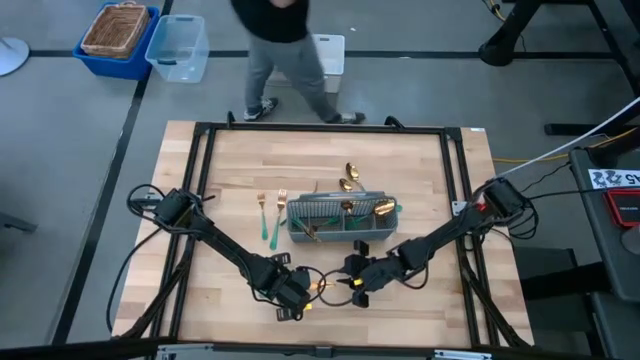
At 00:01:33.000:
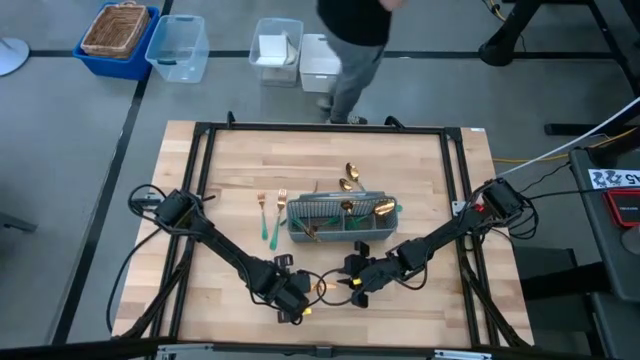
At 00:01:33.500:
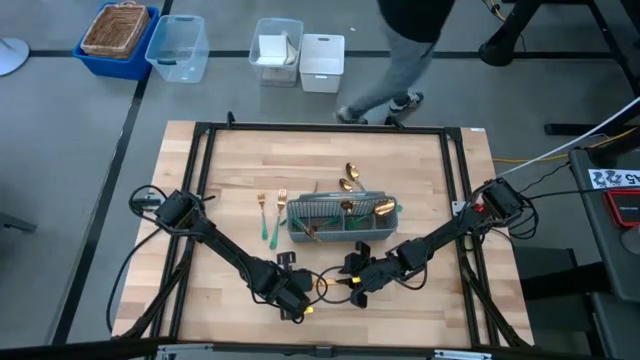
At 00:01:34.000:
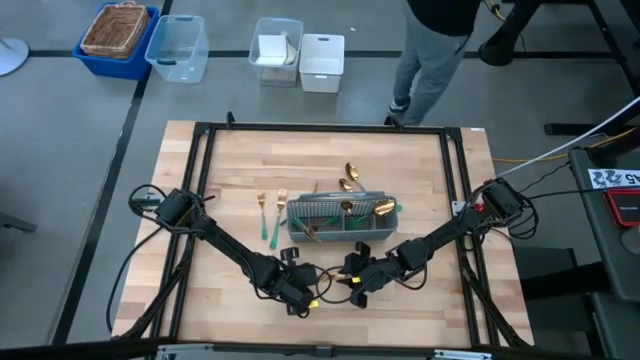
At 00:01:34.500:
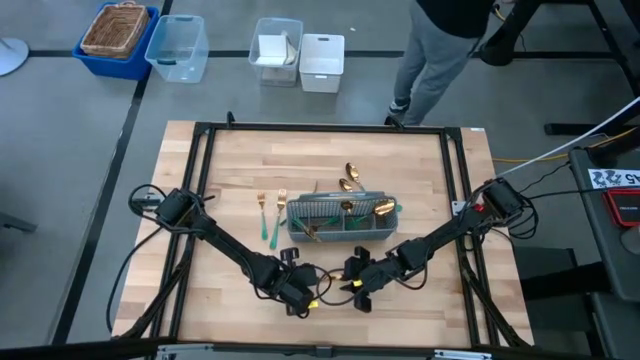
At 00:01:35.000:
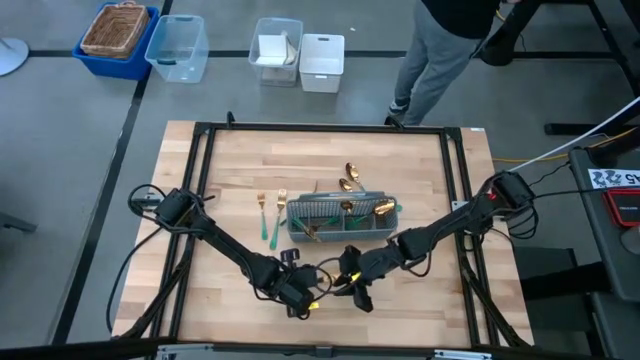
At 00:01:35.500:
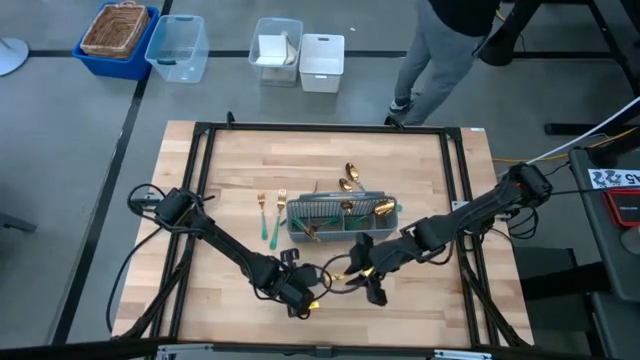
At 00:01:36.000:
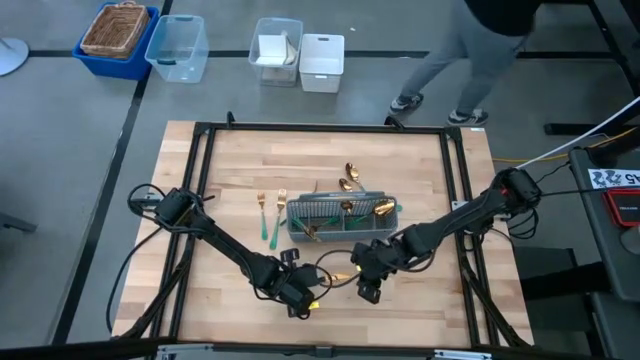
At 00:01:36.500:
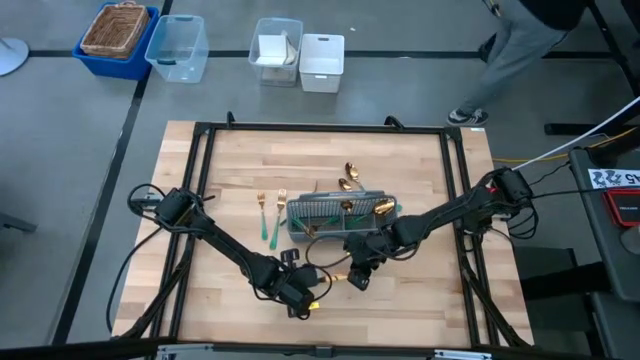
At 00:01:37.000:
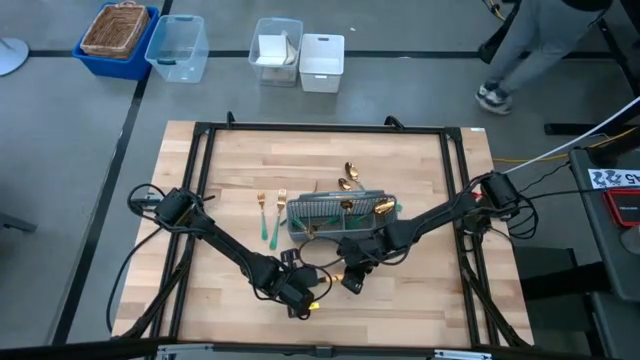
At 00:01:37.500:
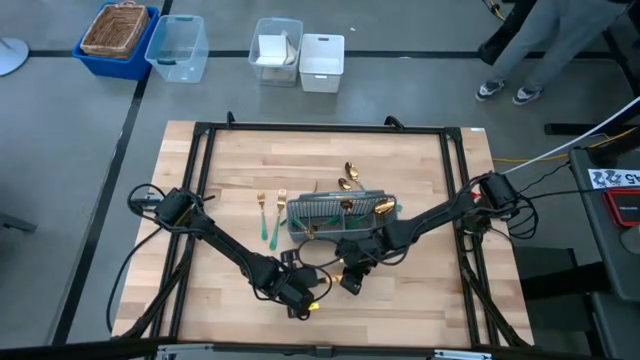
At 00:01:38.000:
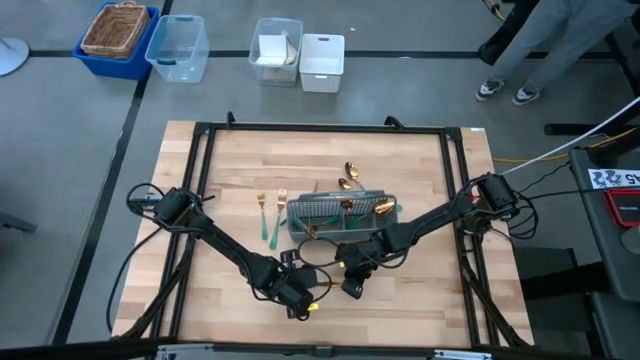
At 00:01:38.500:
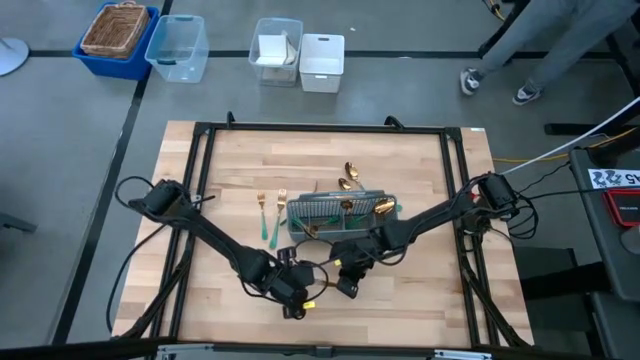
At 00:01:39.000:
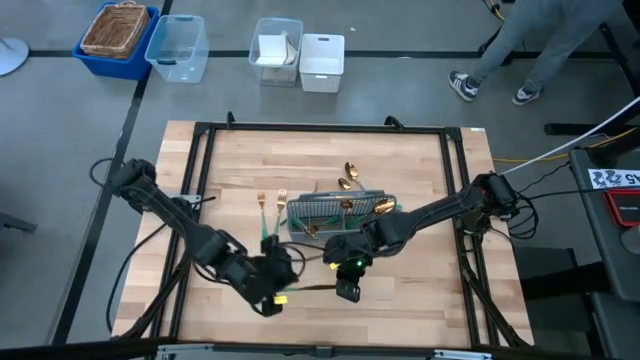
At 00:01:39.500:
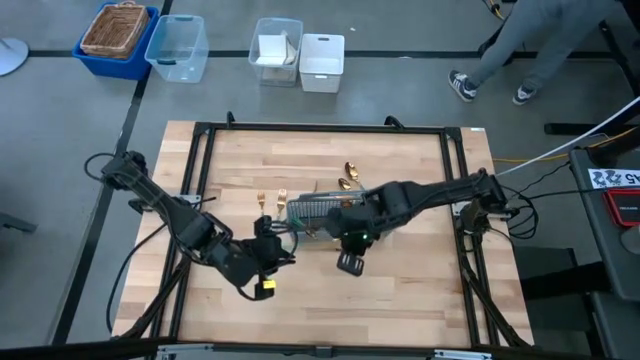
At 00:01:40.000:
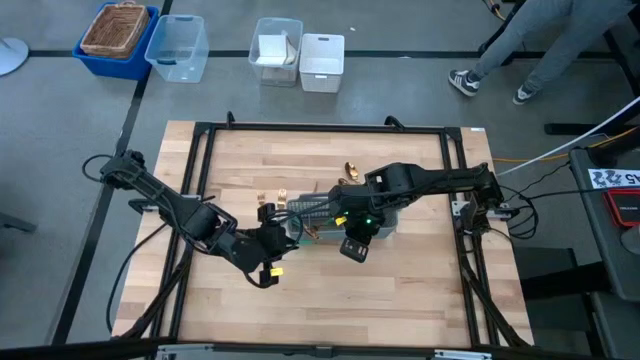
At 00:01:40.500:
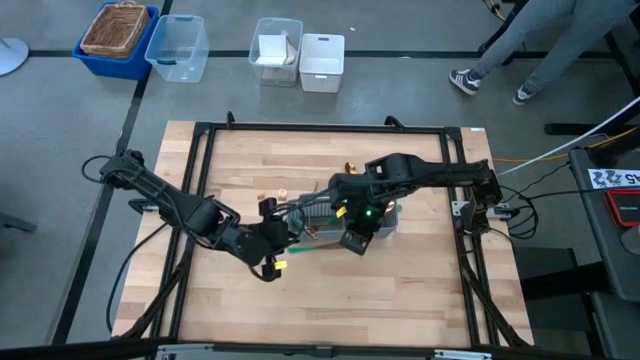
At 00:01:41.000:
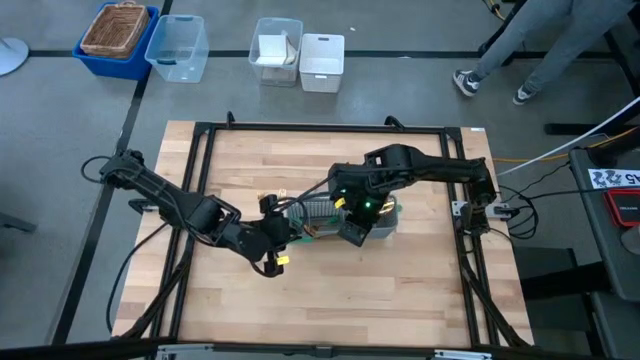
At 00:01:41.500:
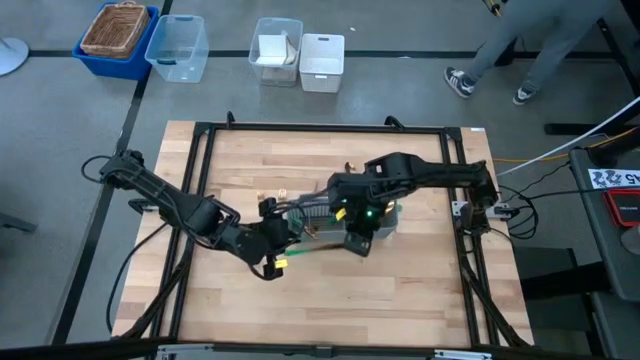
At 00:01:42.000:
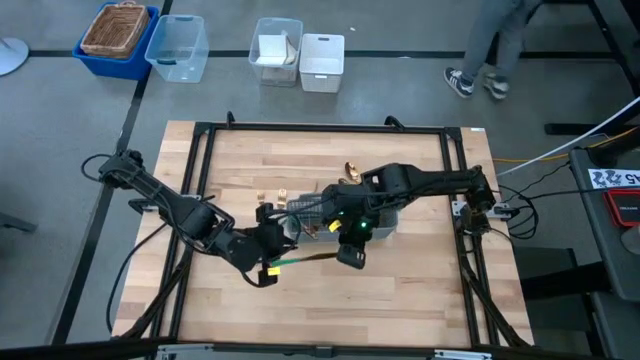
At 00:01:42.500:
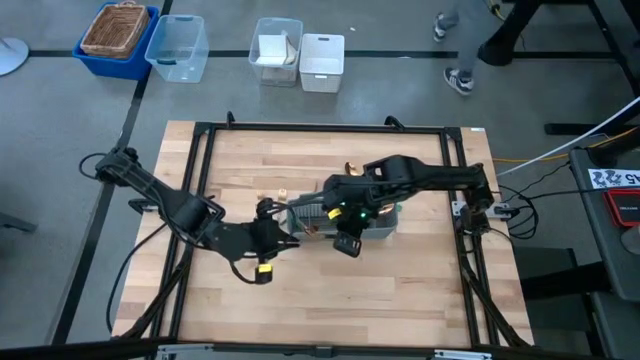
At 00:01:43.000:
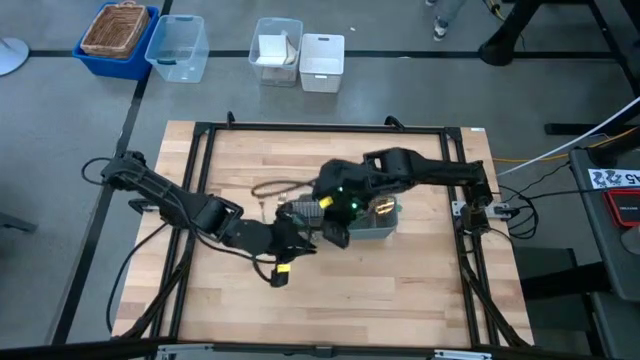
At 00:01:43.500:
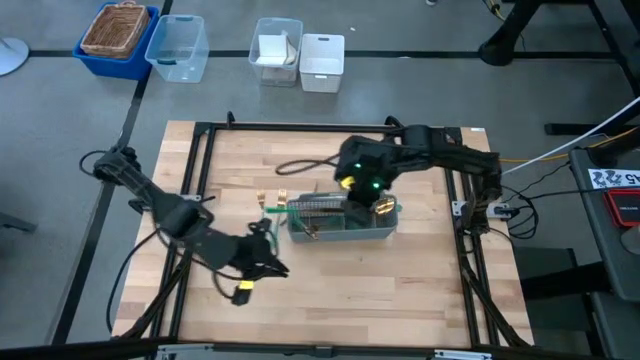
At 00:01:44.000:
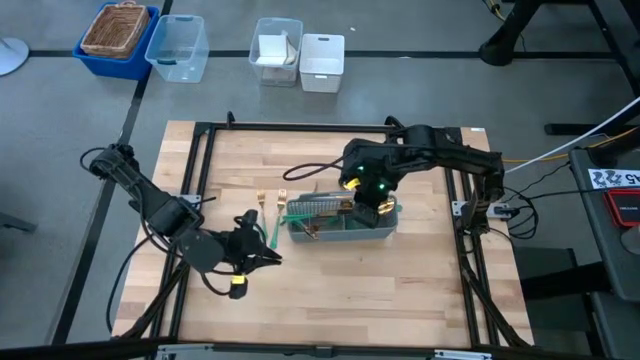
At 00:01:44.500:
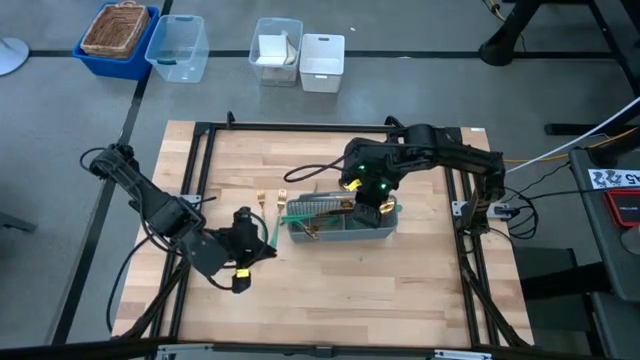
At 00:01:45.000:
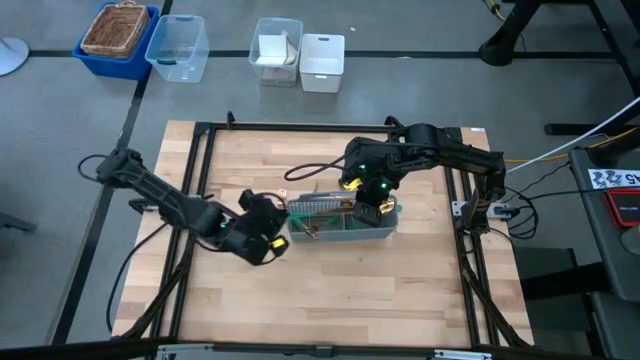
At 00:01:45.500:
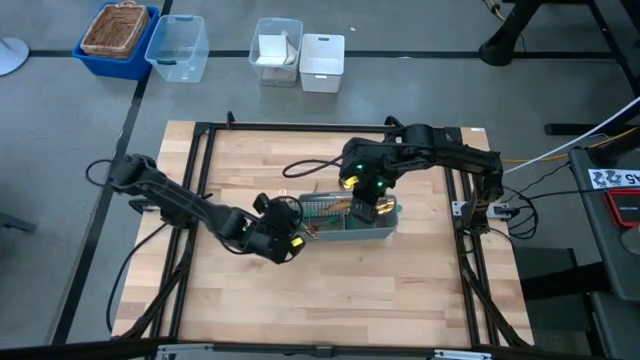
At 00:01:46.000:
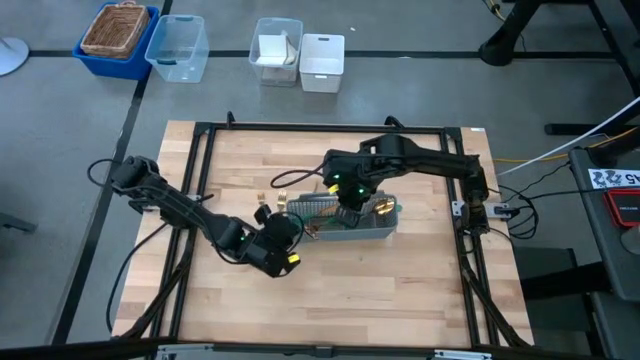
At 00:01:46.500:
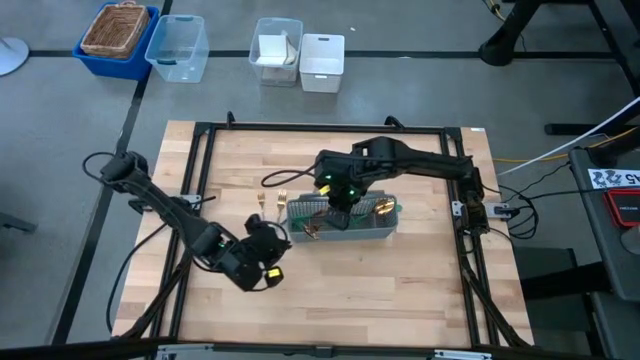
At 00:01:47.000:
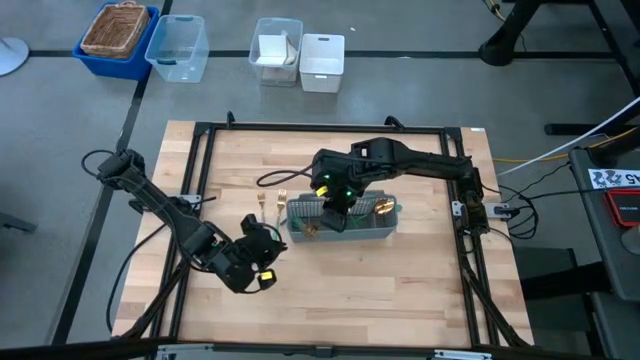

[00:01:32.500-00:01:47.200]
Task: Sort silverware
Put the green knife into the gray utensil holder

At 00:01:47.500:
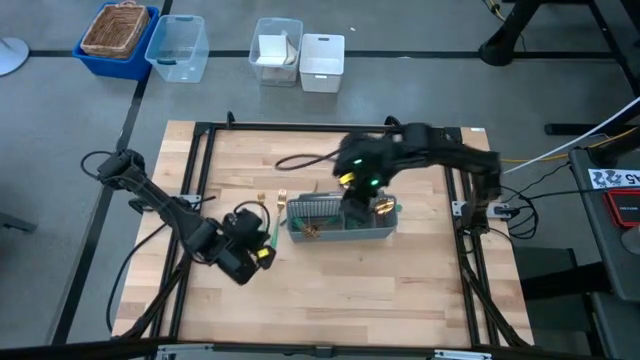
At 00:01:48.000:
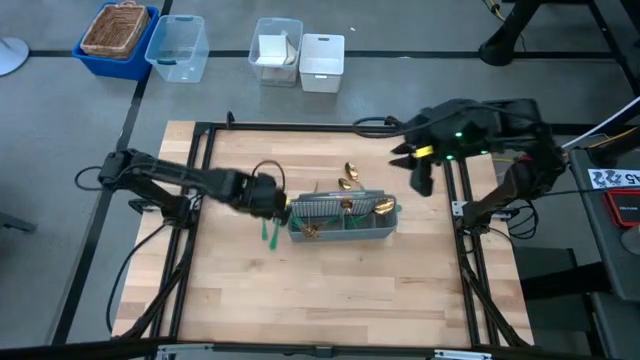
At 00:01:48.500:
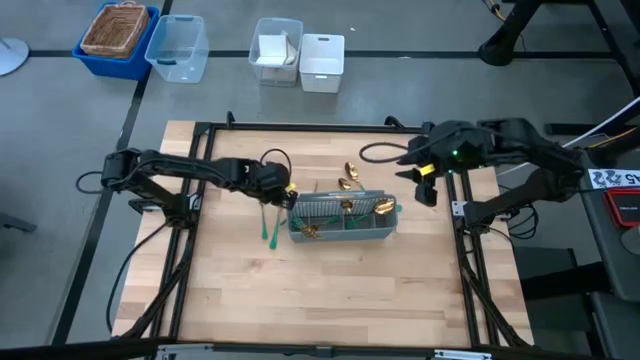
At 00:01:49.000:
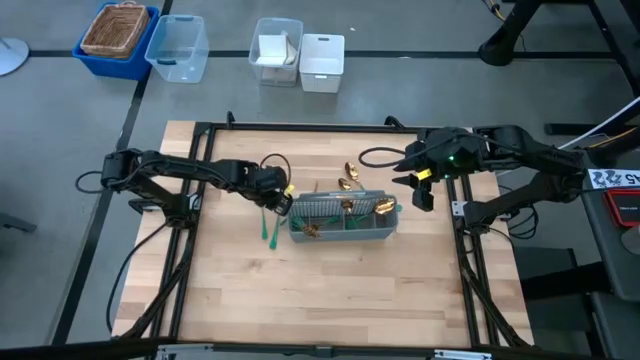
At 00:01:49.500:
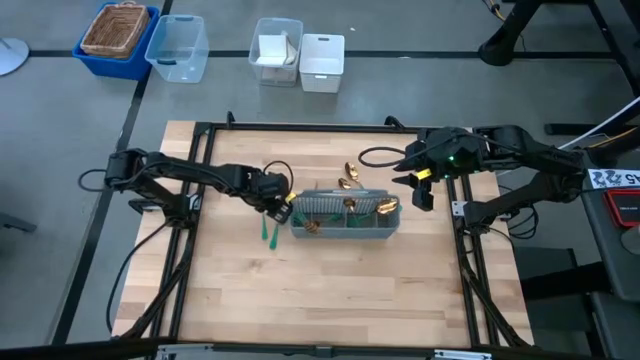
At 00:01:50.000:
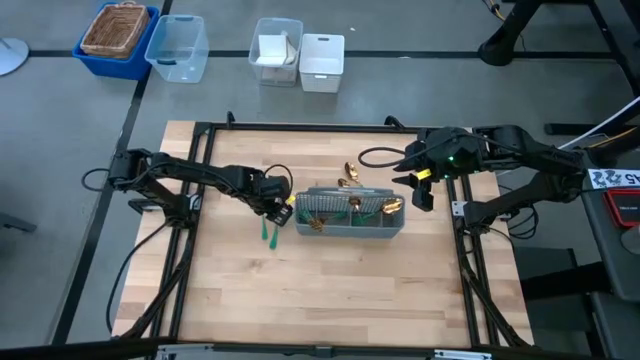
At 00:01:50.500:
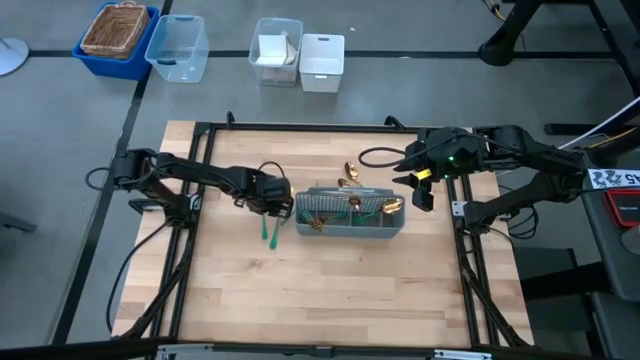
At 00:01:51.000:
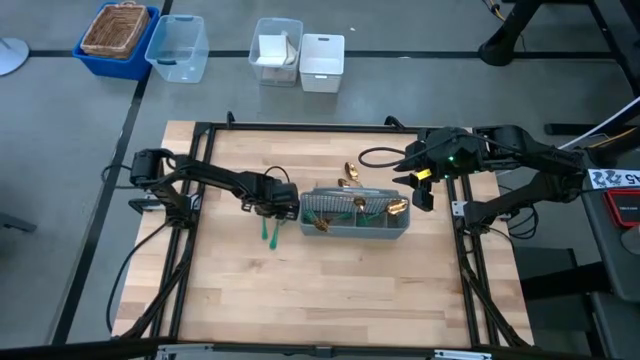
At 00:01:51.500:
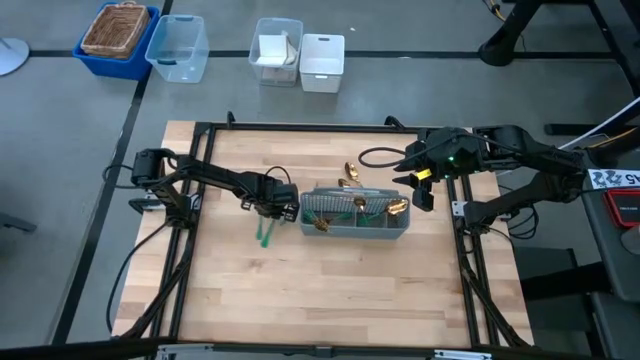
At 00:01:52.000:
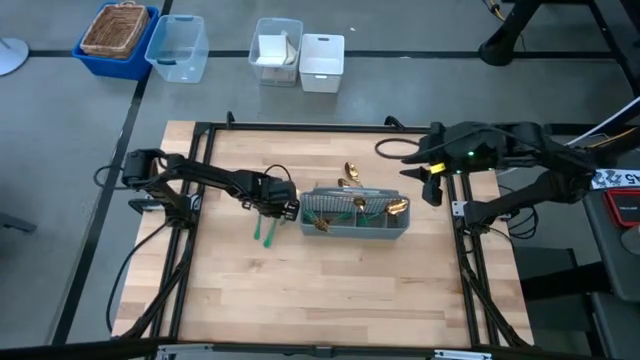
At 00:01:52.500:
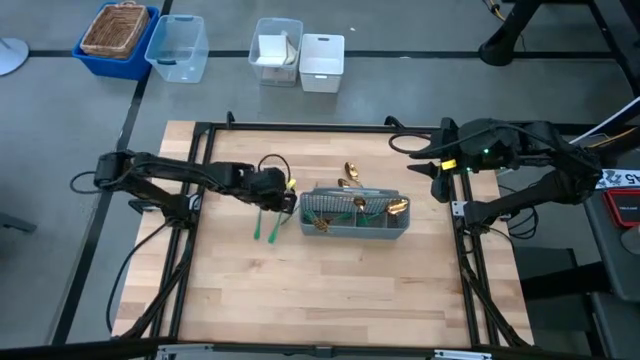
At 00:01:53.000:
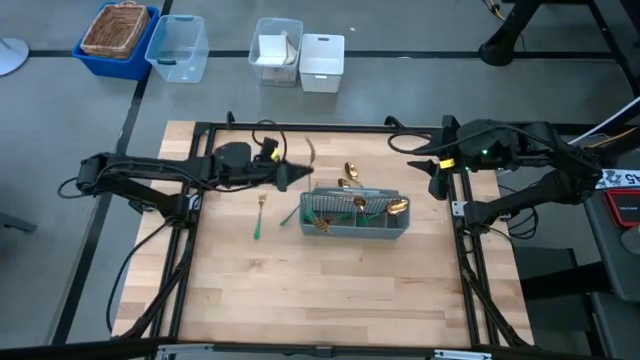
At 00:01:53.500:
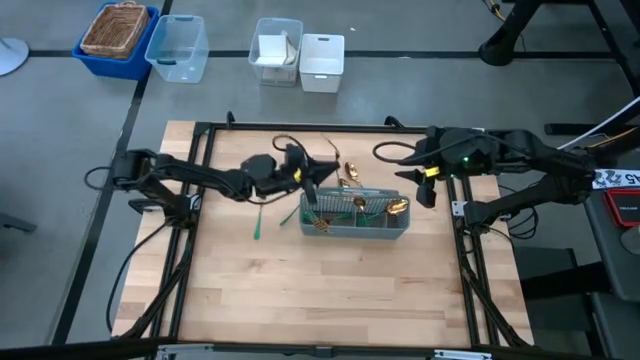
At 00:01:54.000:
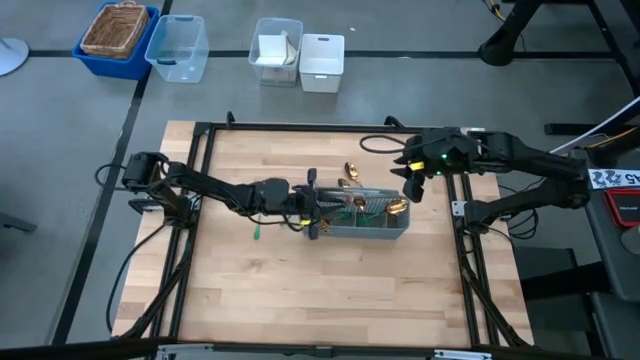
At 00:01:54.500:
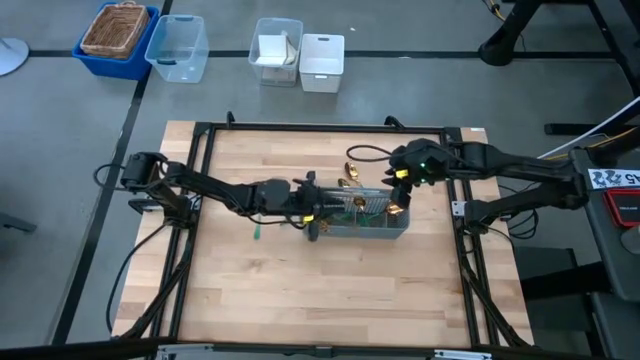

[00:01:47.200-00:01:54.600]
Put the green fork into the gray utensil holder
